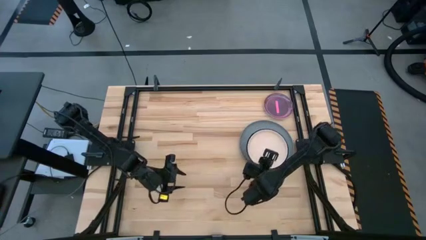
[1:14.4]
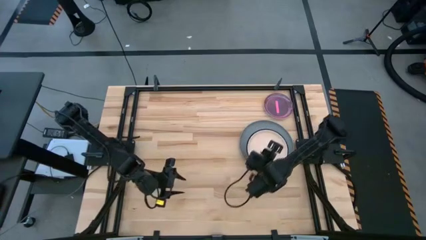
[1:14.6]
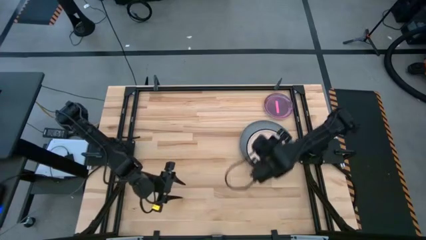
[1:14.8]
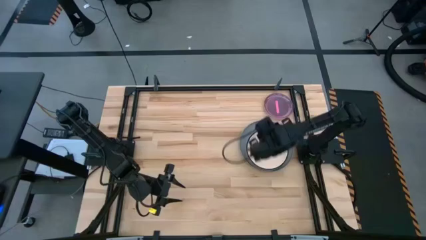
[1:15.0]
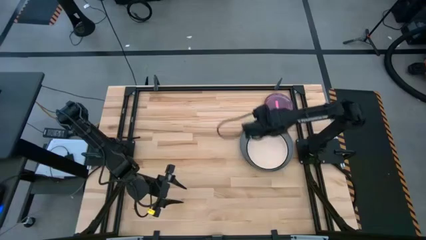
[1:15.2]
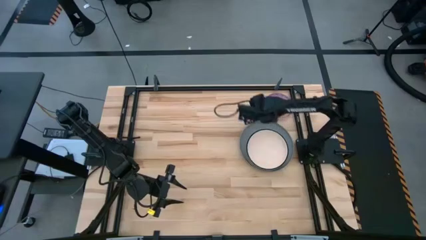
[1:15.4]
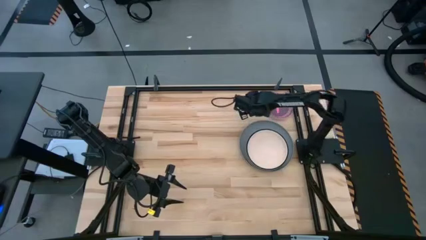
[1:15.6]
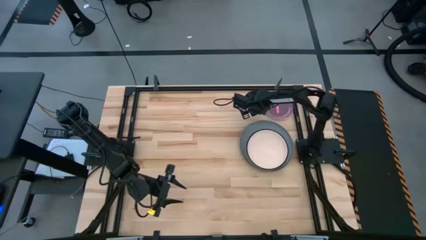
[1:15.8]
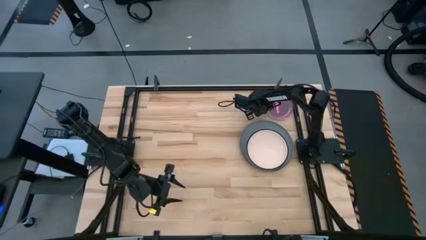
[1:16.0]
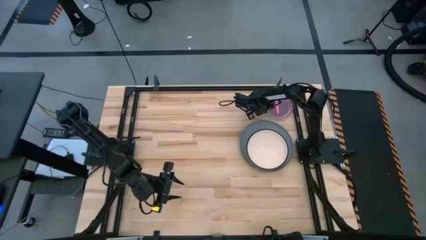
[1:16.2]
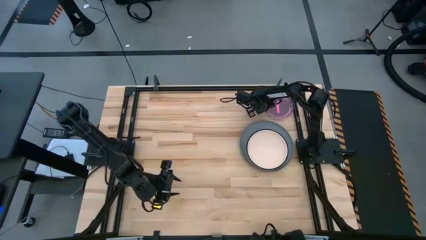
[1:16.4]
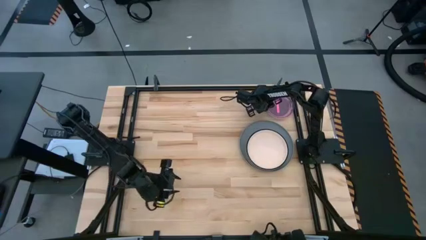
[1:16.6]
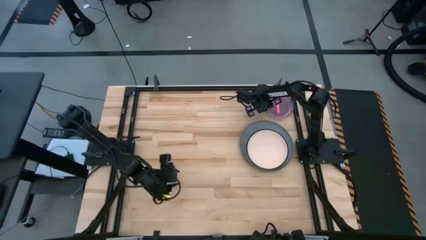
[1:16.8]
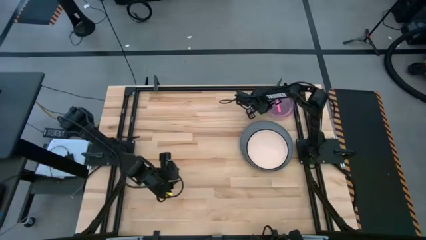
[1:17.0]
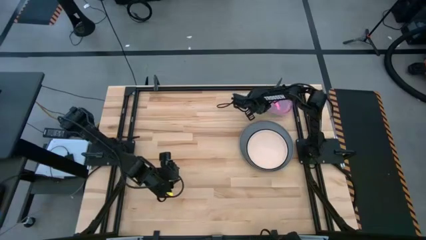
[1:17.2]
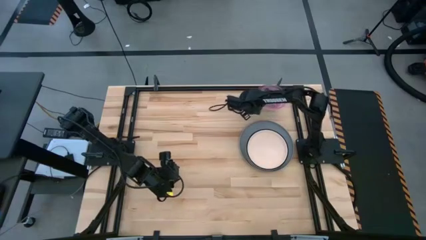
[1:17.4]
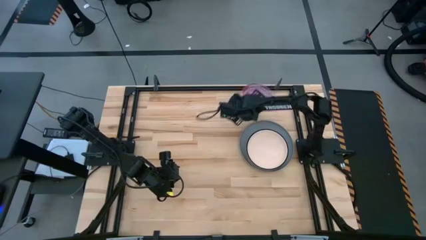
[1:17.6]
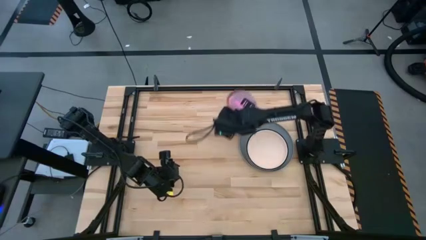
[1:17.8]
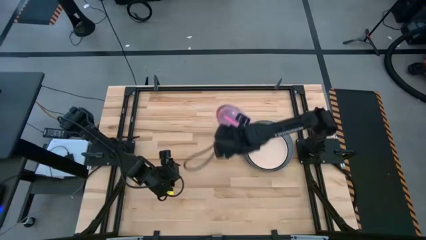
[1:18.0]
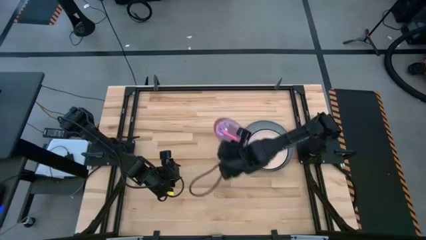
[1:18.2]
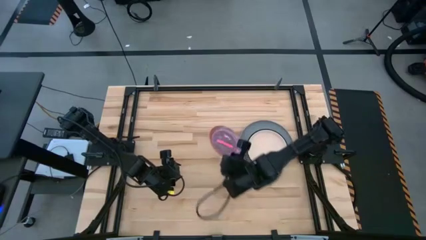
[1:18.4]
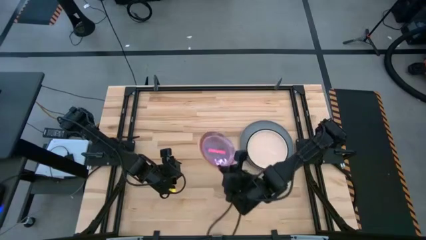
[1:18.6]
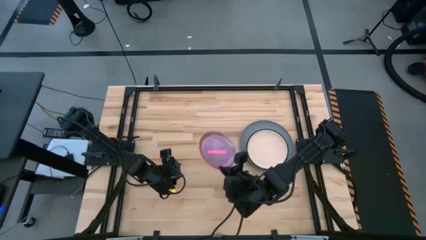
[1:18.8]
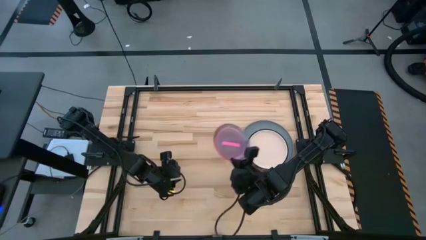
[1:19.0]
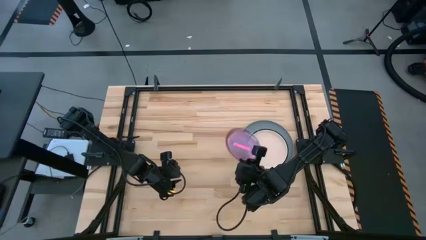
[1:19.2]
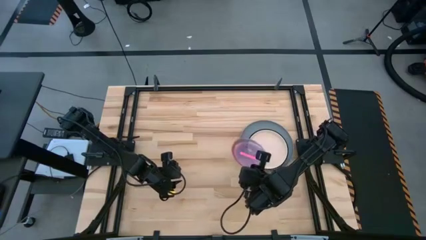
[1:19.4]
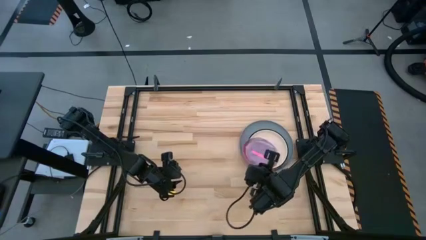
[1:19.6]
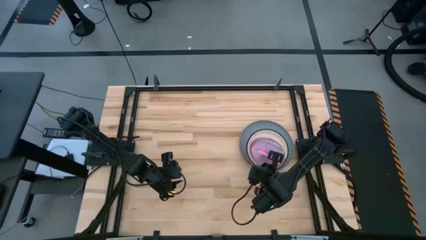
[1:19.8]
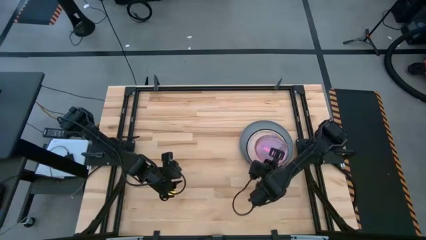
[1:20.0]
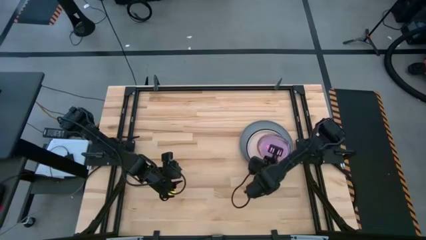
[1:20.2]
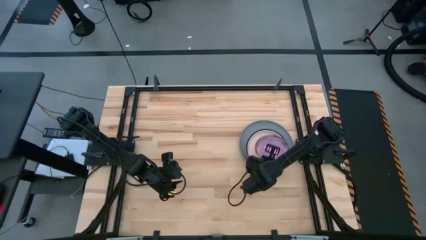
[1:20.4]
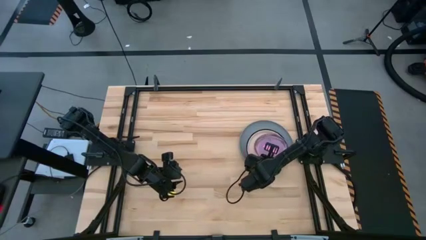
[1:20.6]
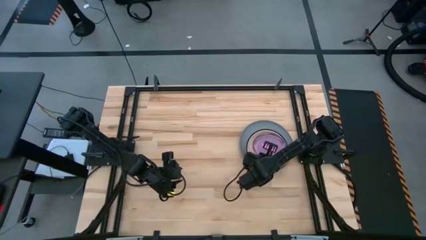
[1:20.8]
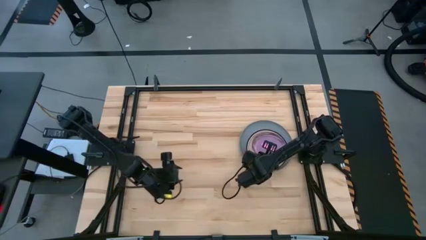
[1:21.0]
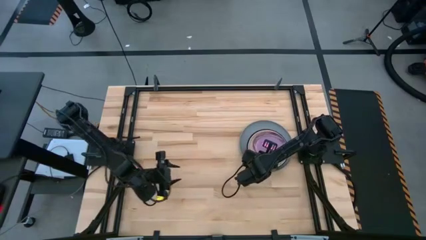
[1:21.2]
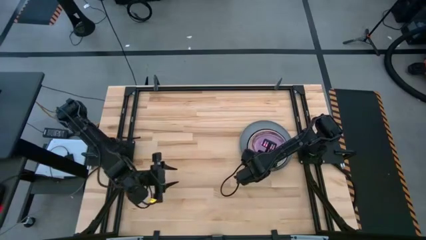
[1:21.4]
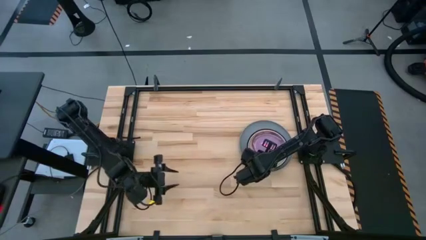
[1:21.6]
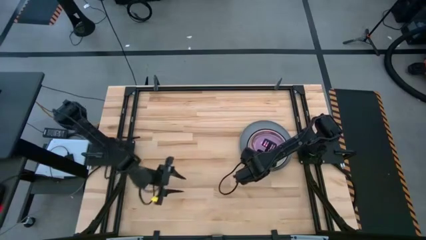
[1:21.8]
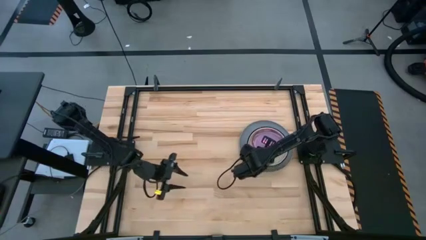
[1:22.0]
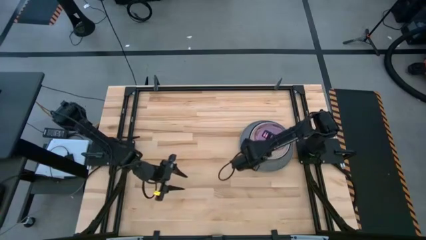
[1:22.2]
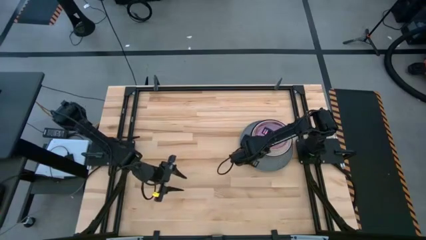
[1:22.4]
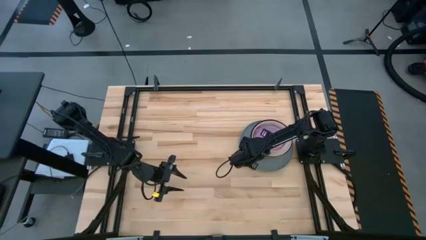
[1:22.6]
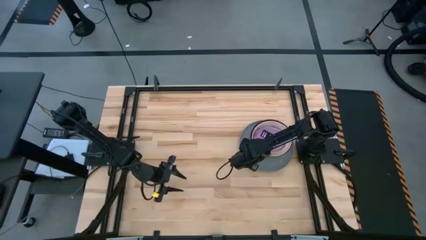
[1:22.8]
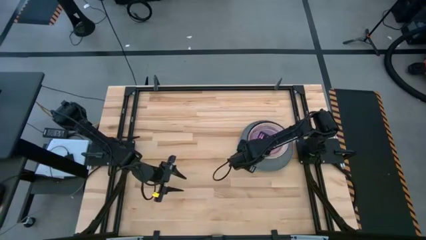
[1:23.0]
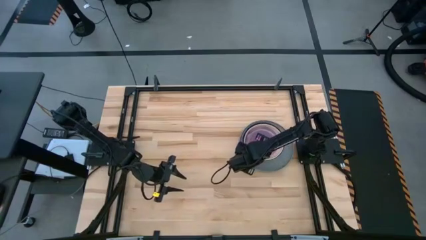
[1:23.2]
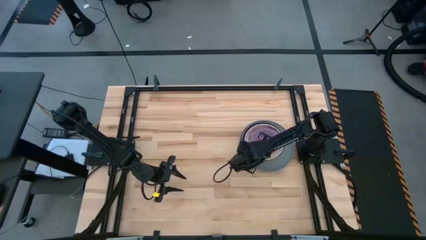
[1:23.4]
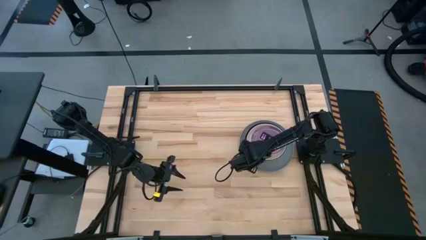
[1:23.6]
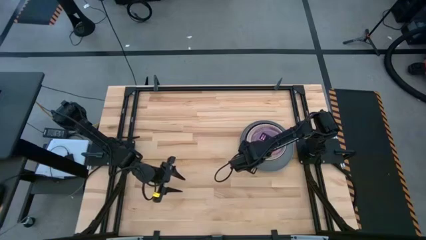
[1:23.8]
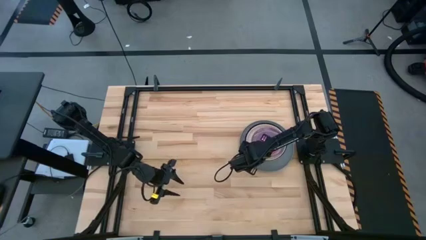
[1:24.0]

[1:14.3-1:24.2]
Task: Stack plastic plates
Stack the top stacked plates on top of the bottom stacked plates

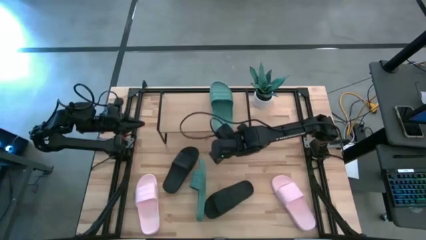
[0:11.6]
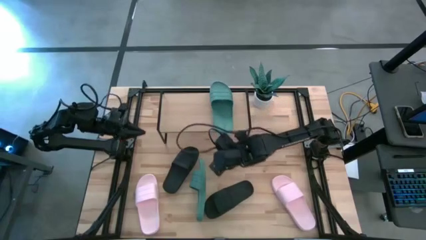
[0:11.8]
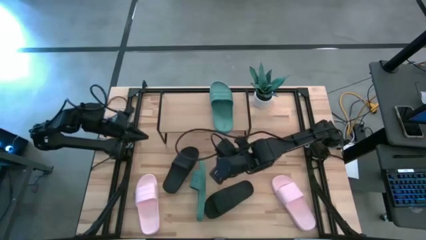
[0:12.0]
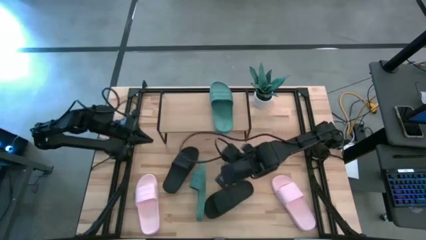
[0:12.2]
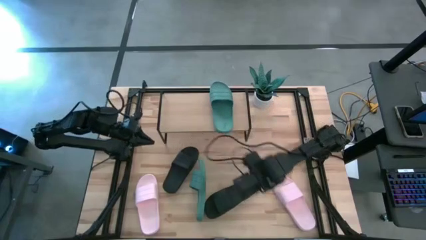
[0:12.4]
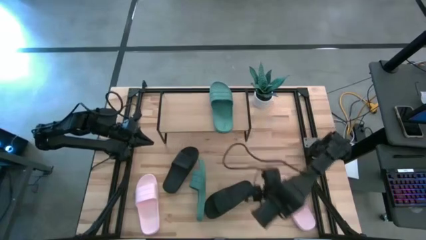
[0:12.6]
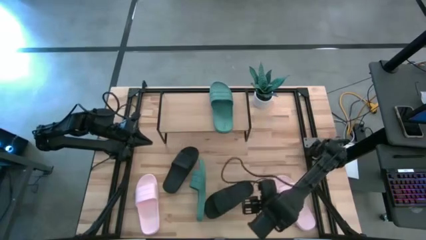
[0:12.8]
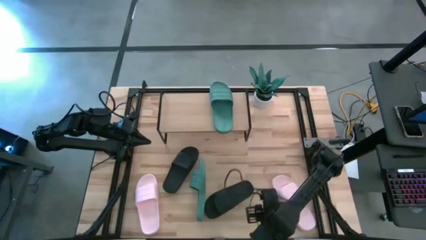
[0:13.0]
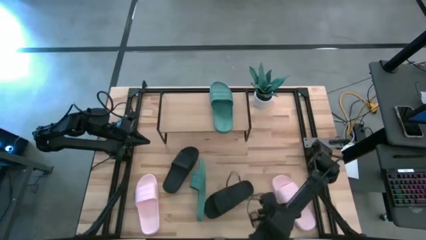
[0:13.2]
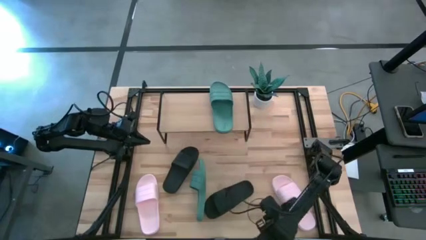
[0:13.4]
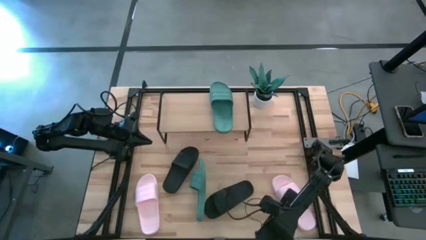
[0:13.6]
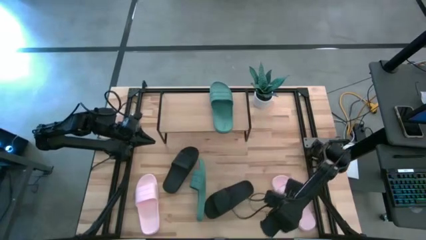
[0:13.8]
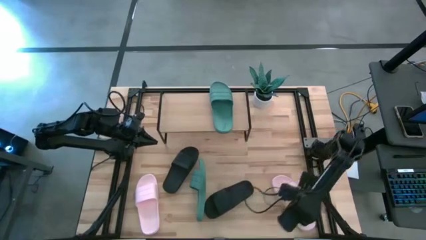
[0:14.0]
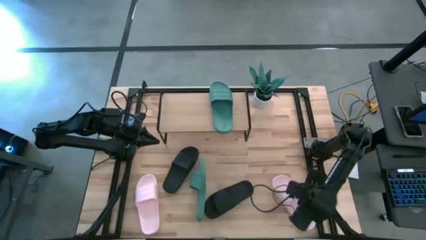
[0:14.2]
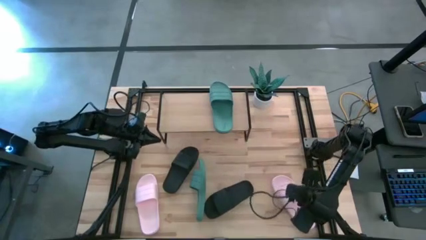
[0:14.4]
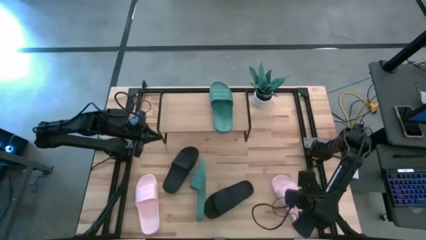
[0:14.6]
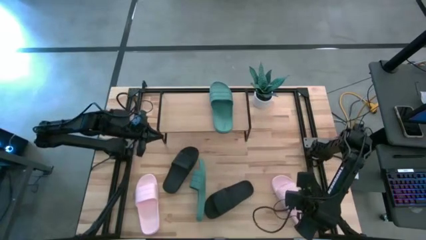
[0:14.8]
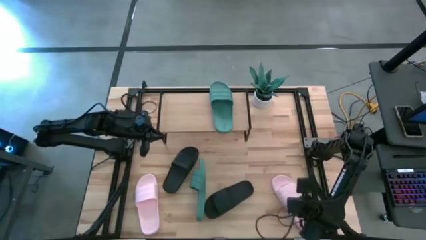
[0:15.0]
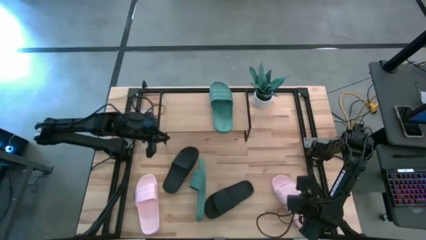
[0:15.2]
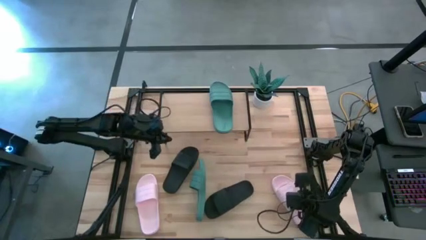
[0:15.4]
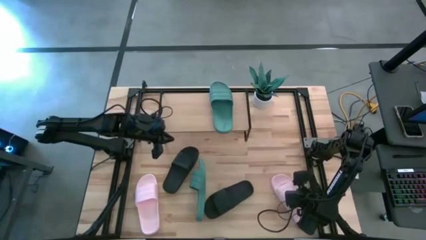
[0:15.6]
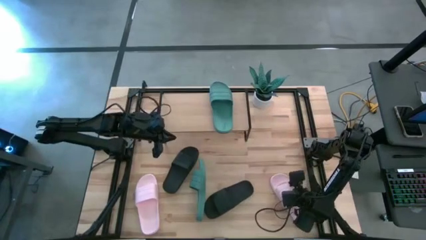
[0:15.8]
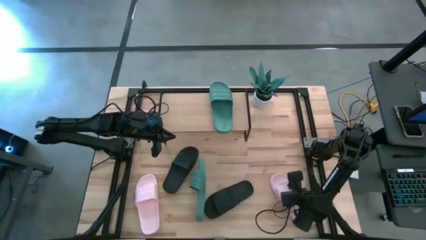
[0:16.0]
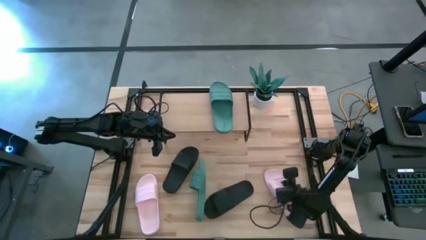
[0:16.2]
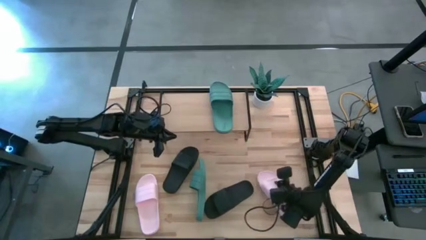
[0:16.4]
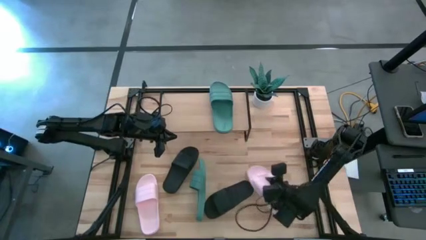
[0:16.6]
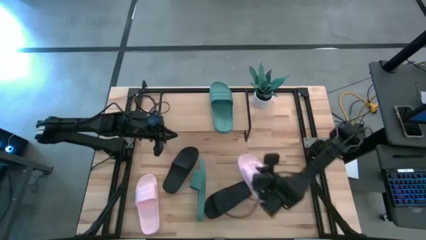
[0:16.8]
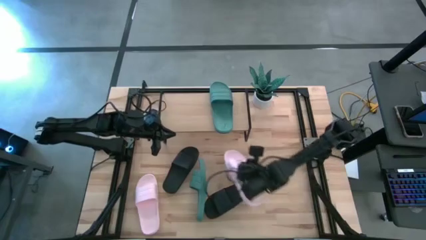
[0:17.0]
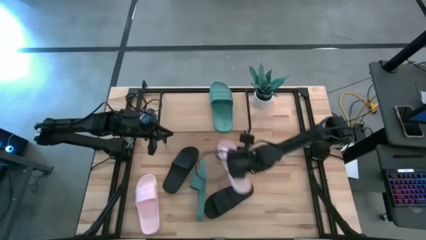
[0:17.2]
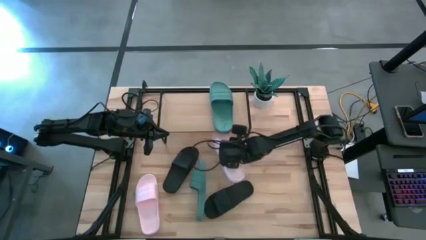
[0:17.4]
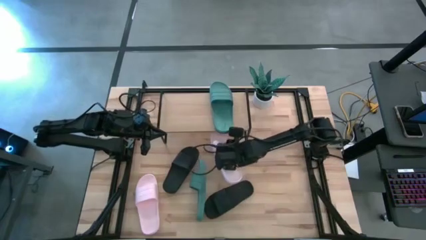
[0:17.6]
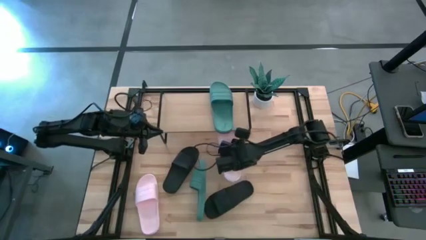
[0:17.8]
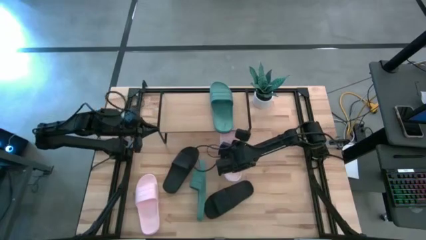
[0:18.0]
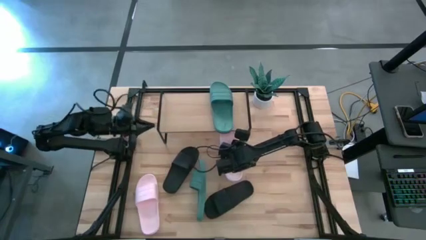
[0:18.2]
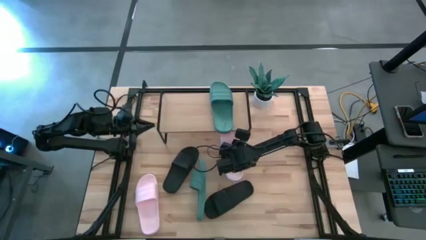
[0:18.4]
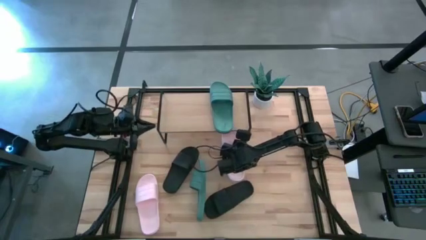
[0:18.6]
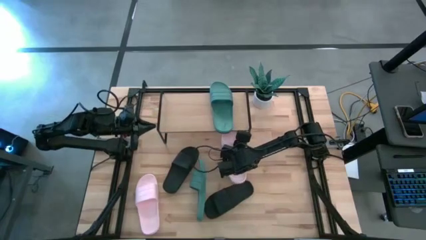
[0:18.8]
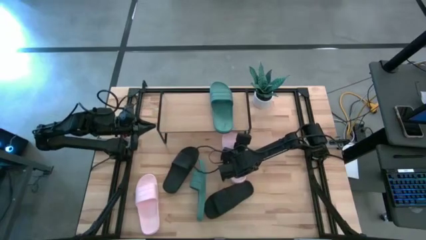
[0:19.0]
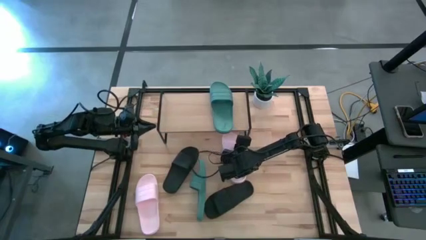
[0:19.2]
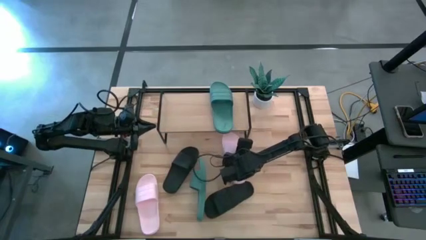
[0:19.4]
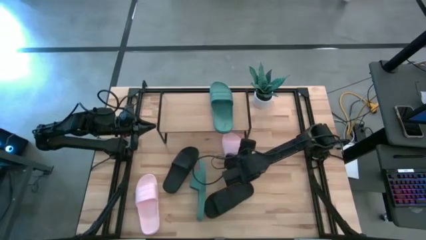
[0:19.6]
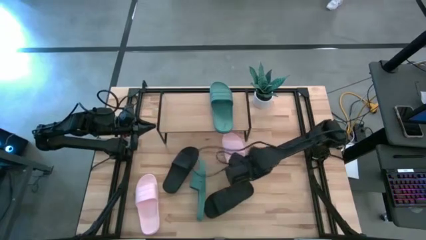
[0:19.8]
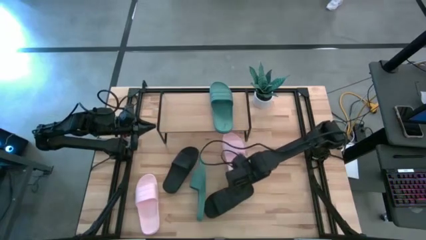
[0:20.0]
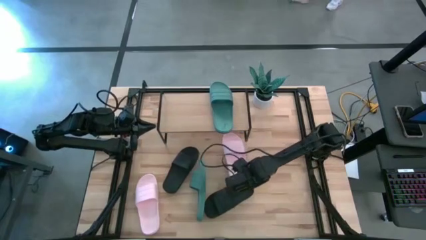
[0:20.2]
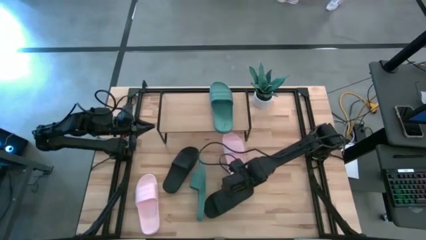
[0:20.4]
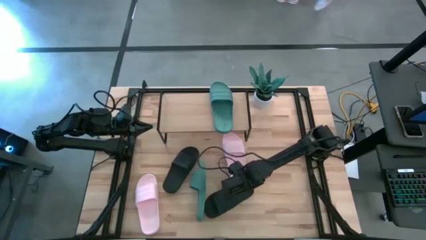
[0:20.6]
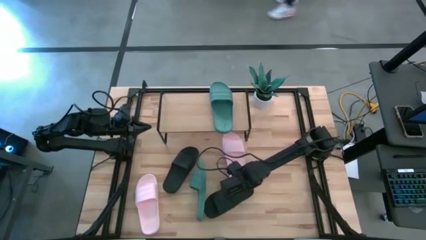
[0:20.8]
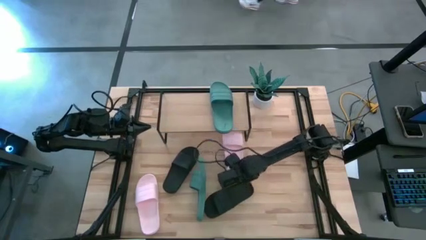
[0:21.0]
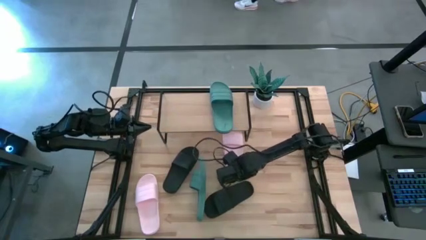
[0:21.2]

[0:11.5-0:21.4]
Task: Pick and place slides into the shelf
Put the right pink slide under the shelf
